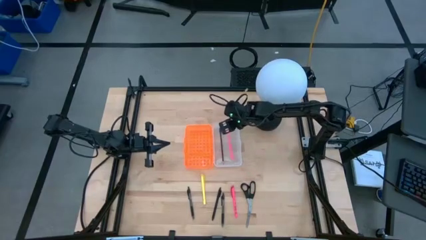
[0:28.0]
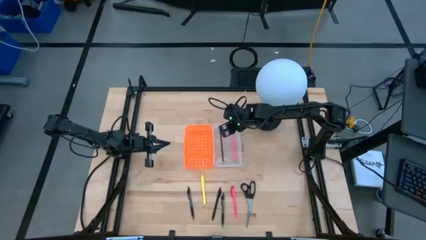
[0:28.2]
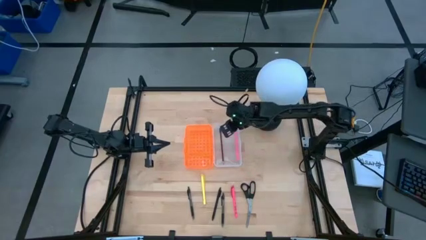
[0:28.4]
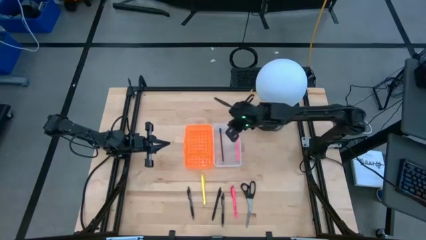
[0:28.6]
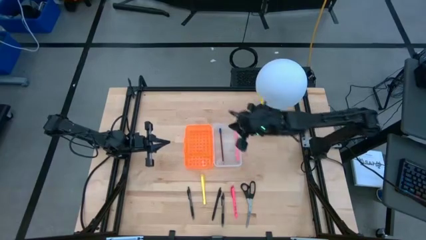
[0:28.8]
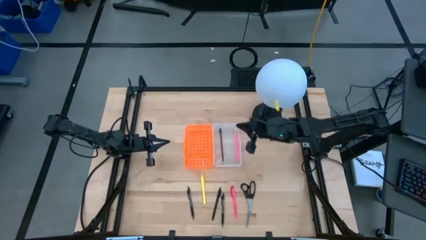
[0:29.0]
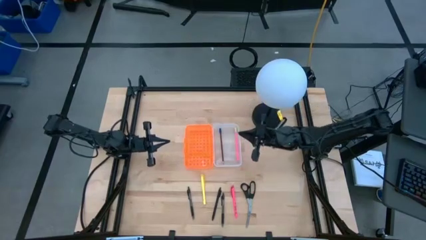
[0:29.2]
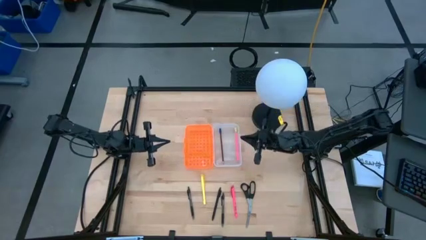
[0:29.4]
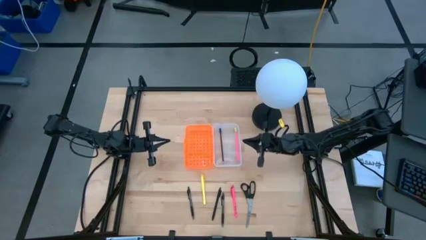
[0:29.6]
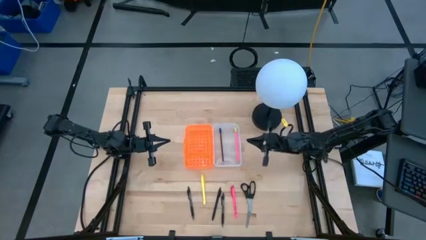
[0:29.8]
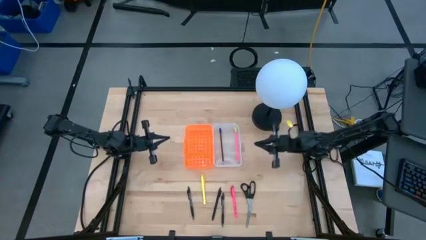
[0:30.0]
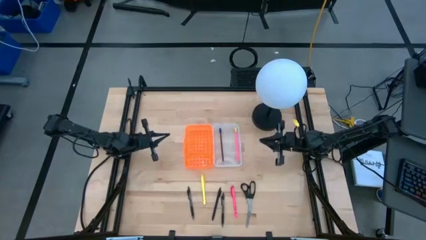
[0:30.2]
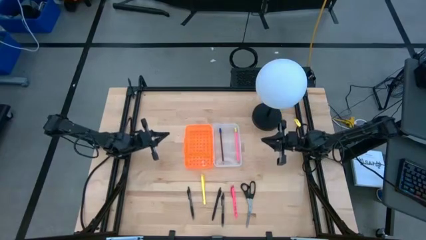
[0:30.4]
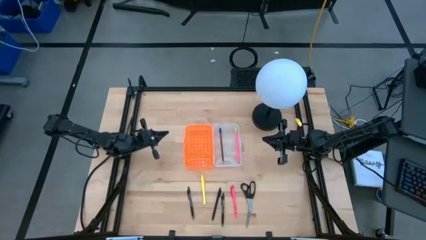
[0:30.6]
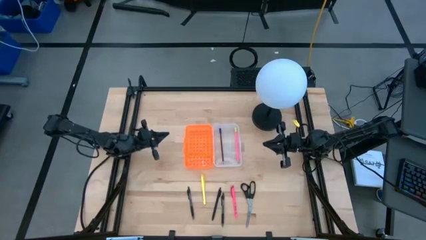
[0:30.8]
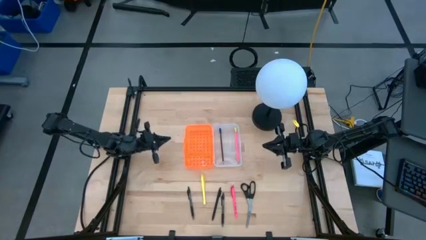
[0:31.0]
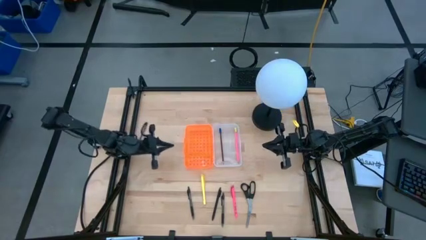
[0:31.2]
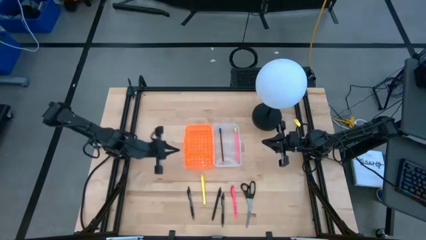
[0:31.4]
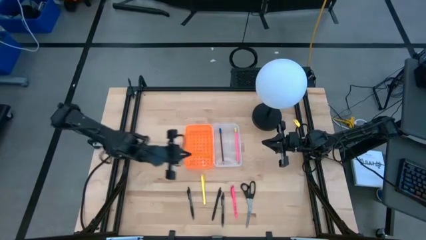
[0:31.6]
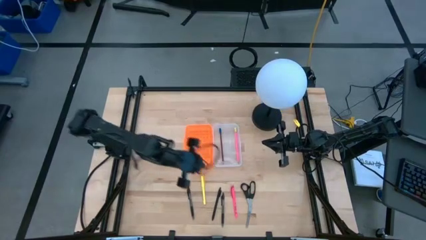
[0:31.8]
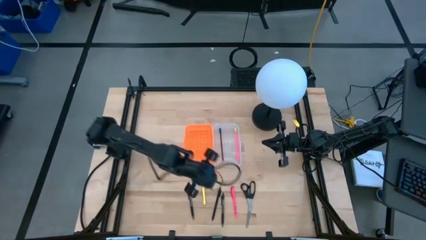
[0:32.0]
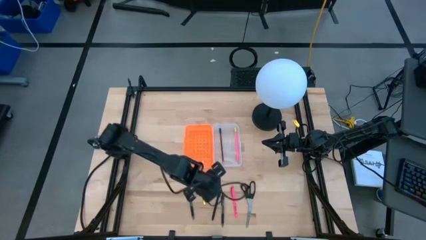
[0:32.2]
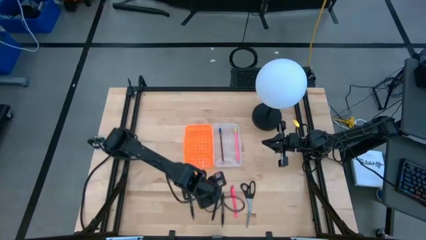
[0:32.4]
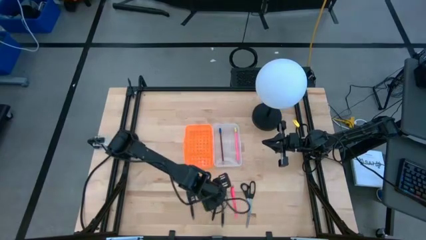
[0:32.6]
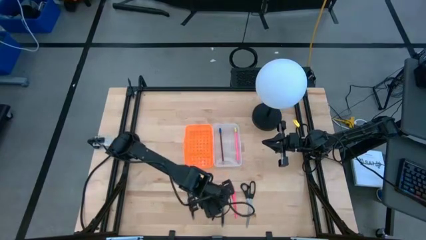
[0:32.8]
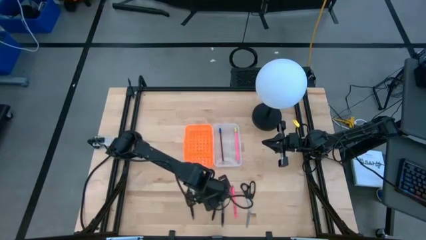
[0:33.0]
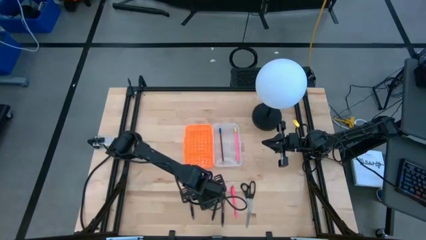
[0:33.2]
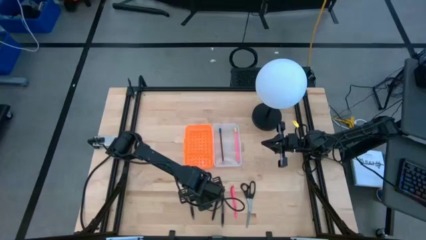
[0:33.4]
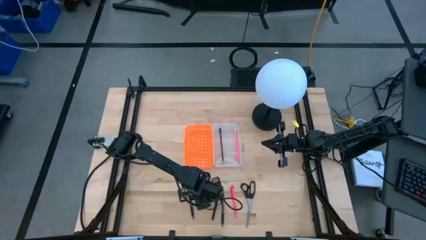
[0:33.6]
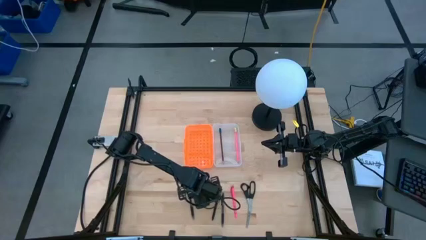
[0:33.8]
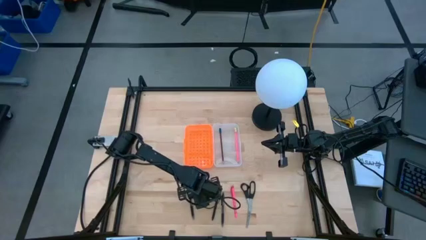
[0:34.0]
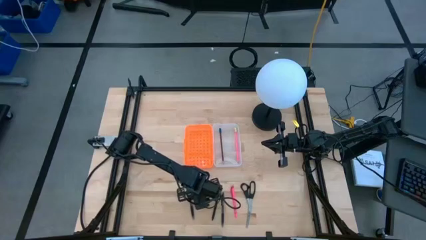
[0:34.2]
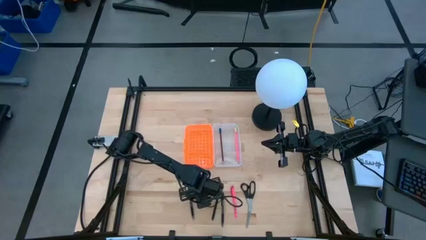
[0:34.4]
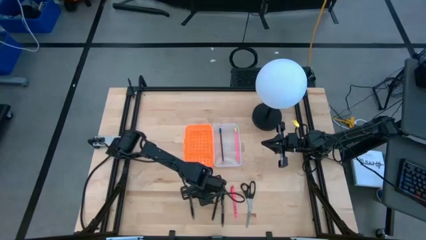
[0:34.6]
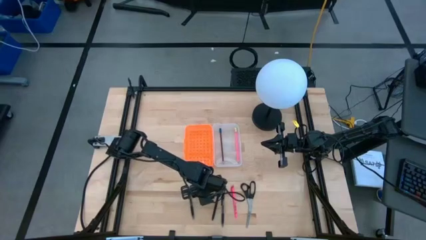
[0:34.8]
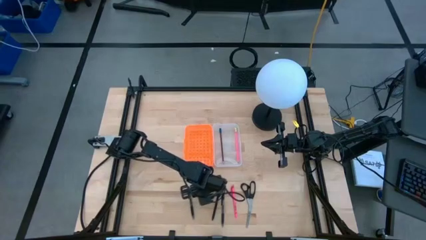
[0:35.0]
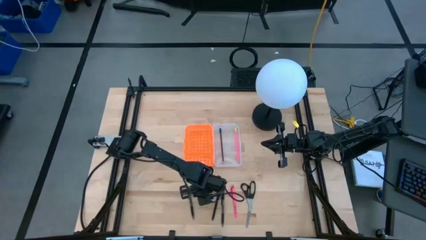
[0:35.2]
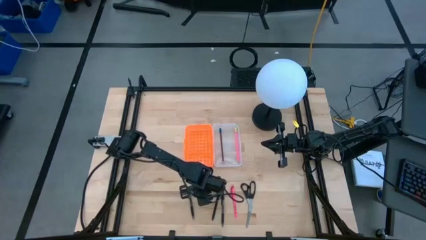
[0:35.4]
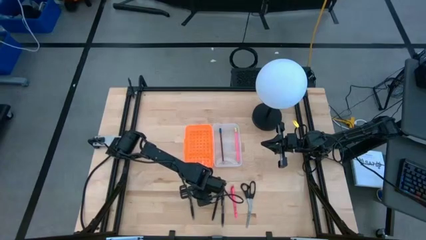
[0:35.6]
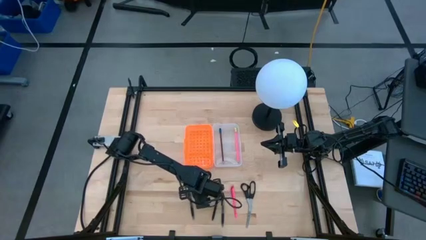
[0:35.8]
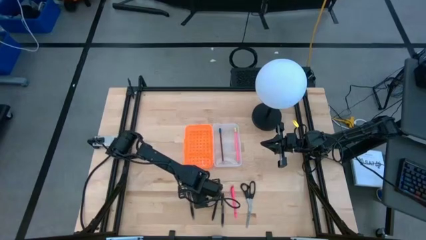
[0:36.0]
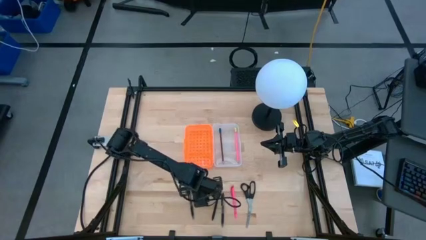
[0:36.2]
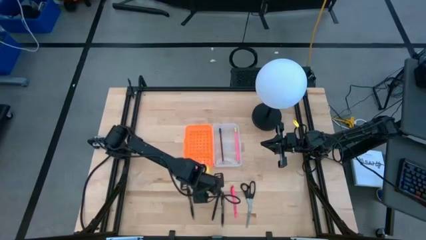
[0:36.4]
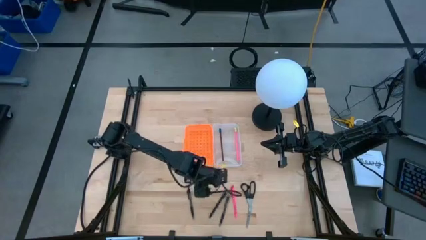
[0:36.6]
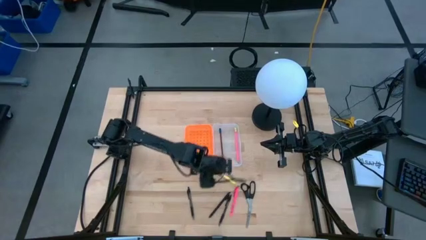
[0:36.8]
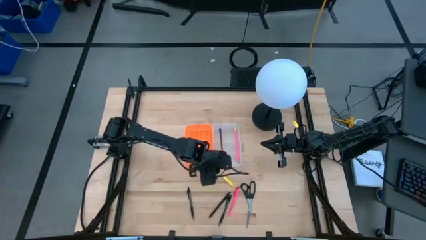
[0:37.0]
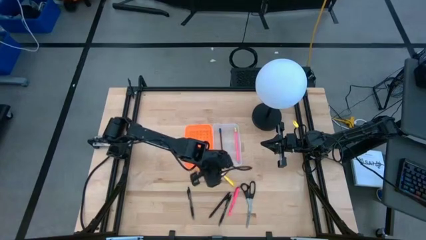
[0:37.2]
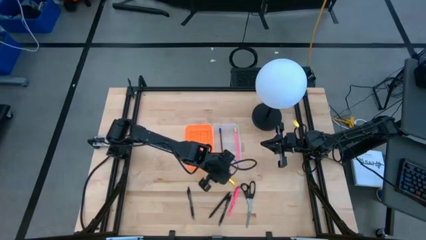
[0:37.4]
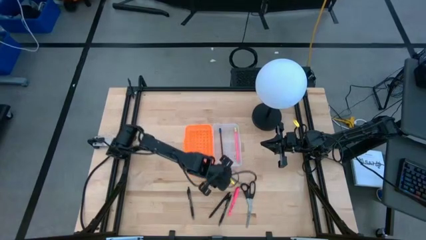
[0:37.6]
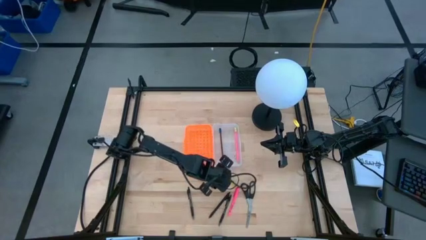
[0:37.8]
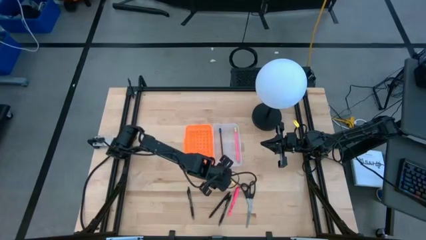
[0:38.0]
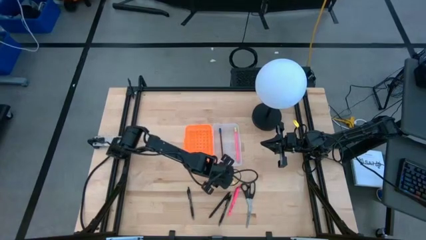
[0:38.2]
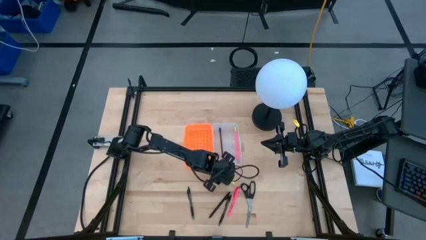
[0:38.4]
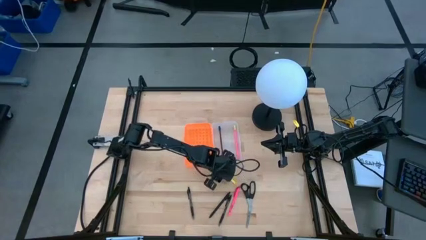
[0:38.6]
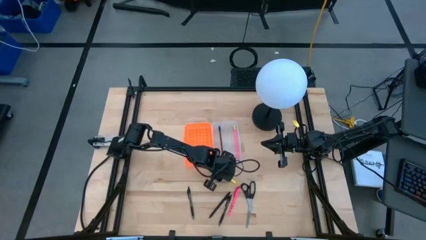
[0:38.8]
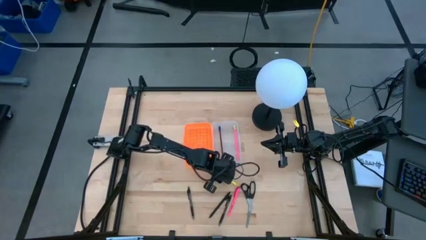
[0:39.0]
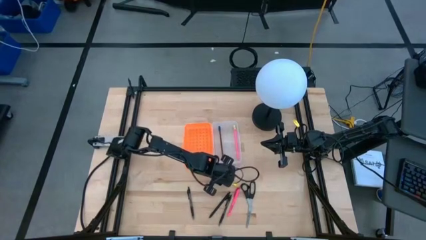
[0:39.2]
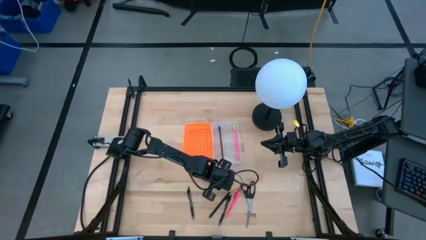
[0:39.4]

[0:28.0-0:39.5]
Task: Pick & place school supplies into a supply box
Put the yellow pen into the orange supply box

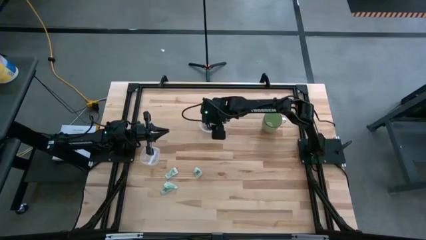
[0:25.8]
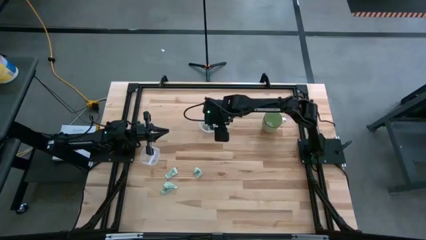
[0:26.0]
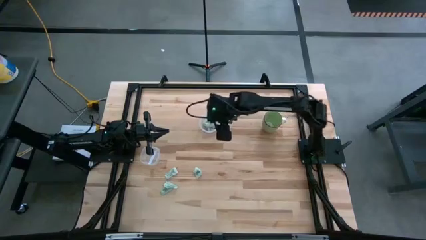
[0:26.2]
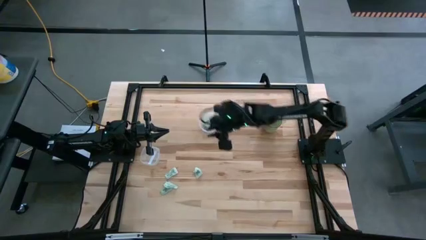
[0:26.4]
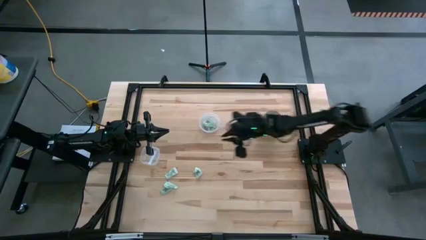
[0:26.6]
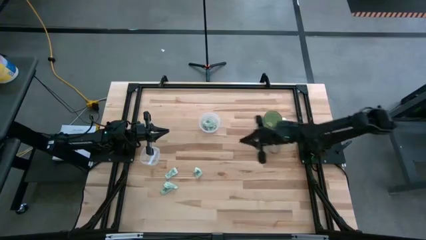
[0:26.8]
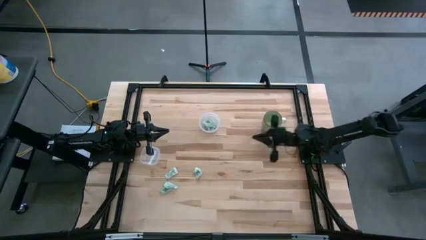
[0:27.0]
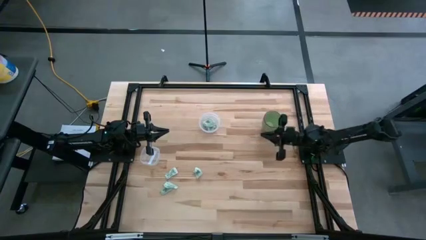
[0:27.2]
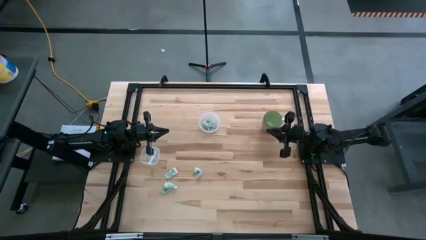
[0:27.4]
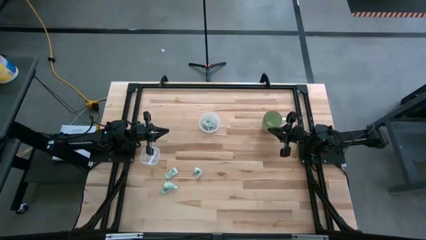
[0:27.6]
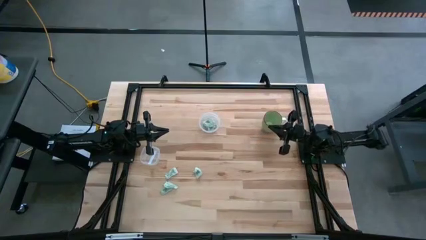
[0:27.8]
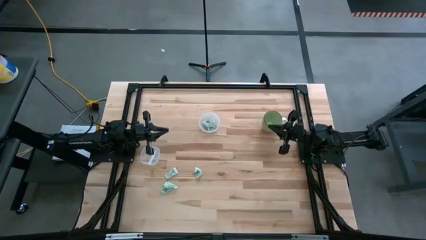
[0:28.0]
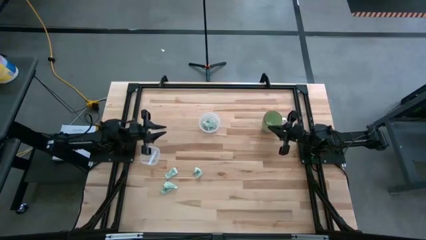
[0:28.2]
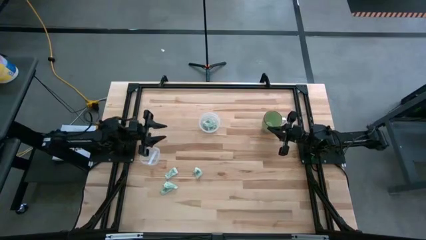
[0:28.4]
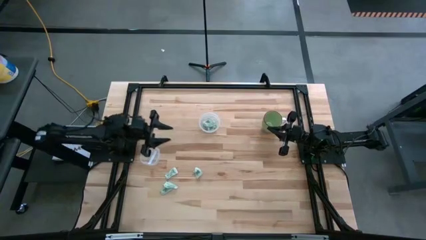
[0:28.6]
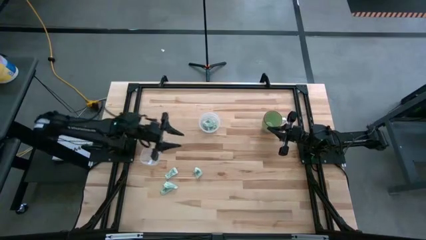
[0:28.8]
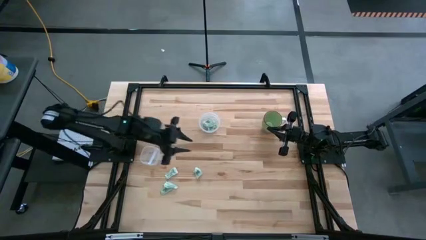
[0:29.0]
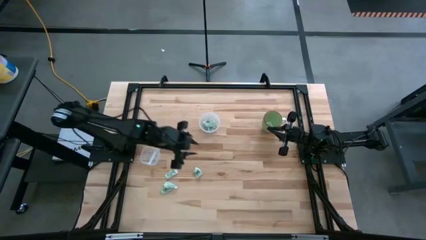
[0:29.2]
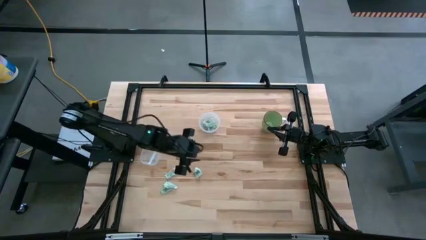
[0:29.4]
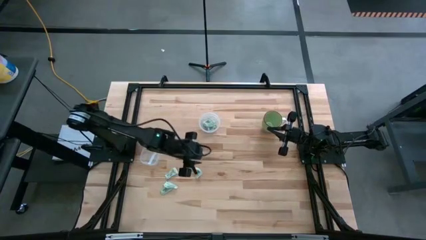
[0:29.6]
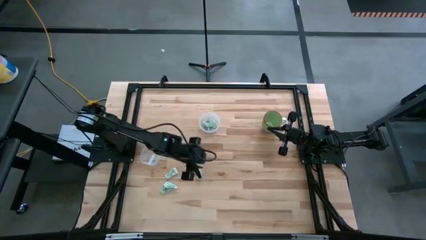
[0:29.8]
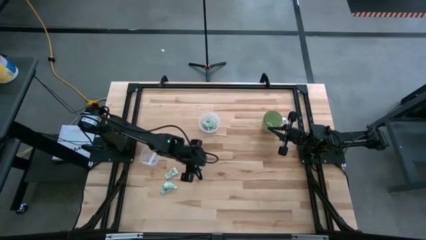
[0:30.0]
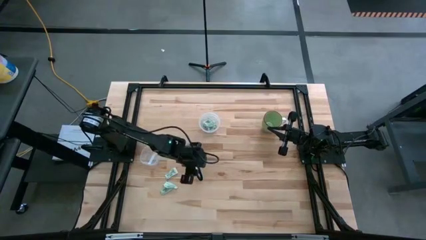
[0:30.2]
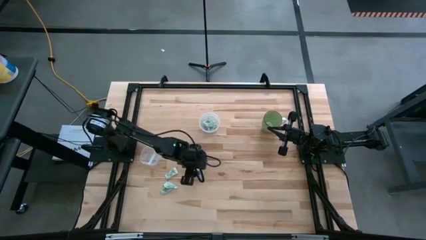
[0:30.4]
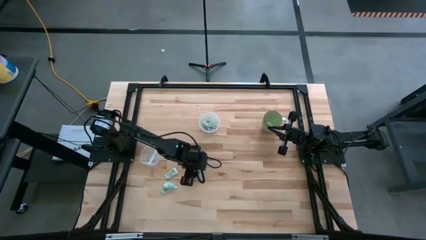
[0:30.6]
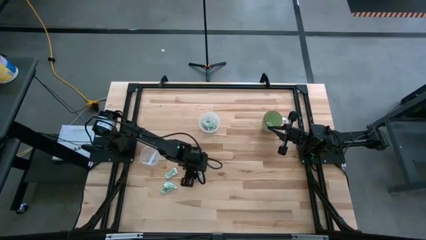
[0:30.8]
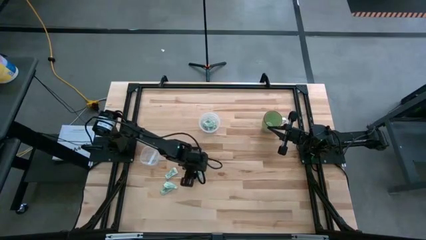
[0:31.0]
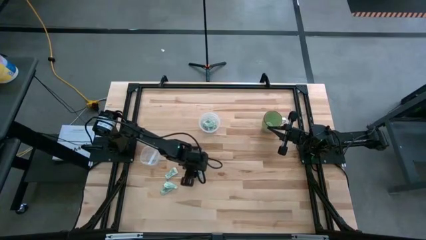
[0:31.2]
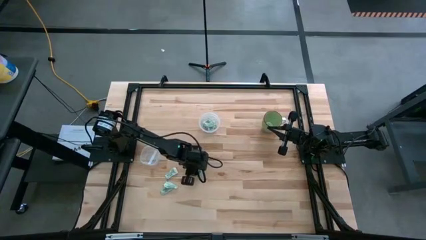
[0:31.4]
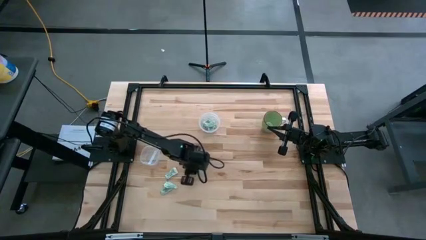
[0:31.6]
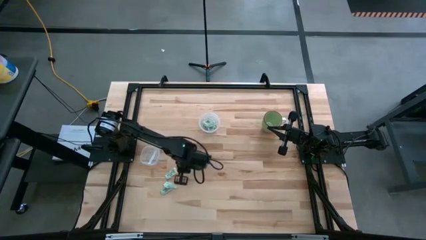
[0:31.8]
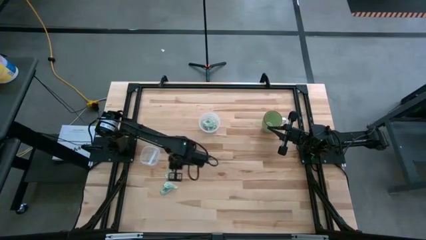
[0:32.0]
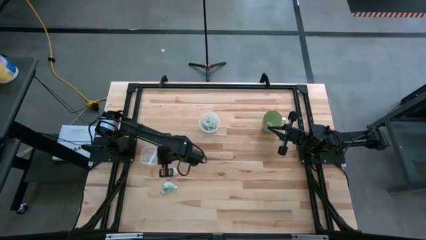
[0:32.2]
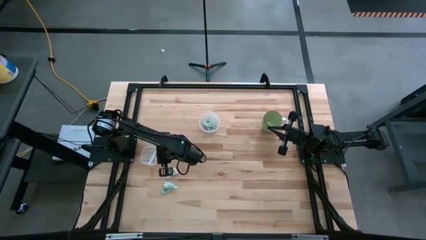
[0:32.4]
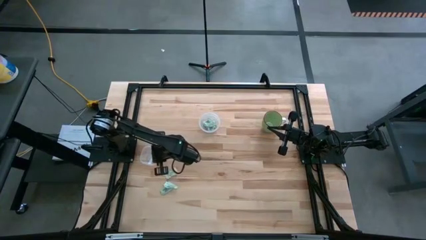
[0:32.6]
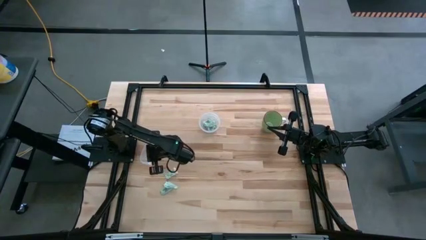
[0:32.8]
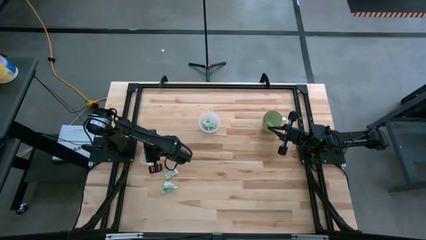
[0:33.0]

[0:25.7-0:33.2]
Task: Pick and place Stevia / Truvia into bins
Put the stevia packet into the left transparent container
